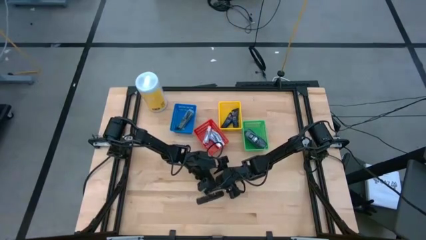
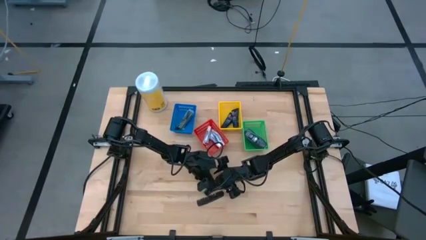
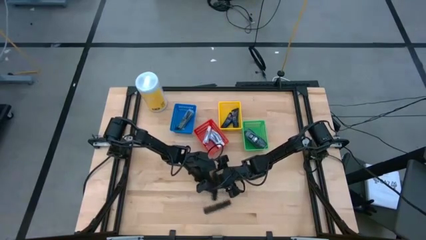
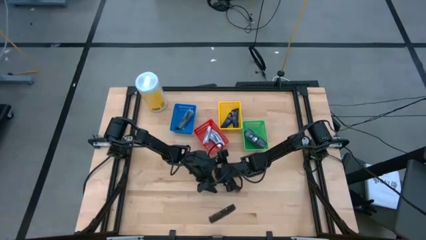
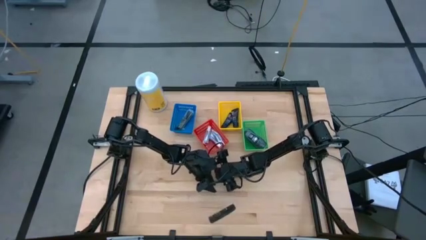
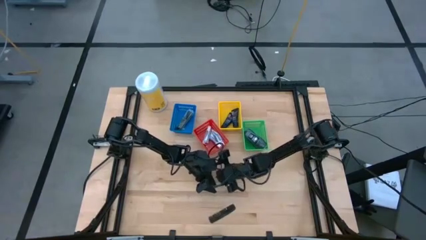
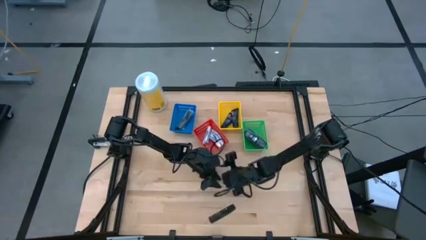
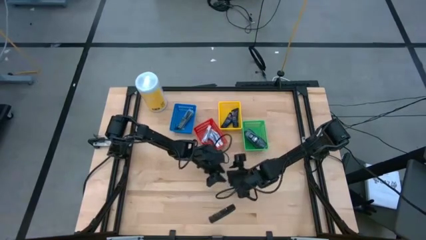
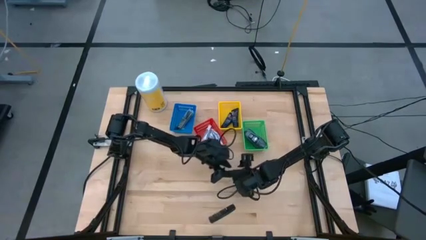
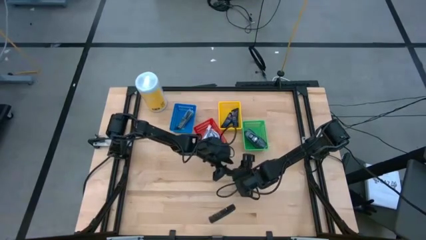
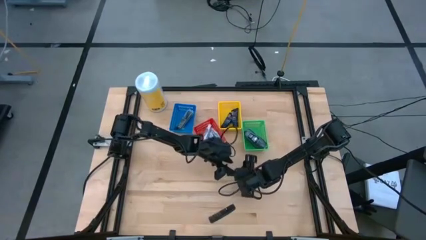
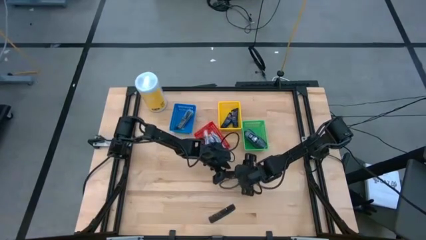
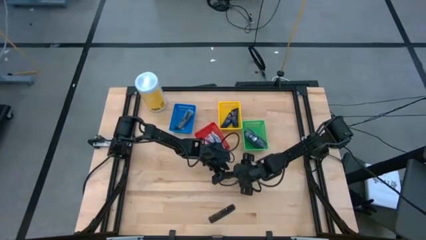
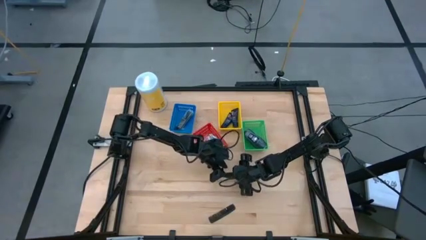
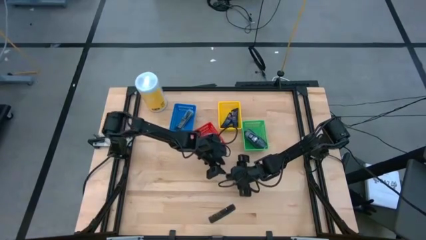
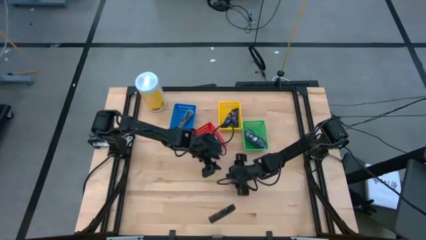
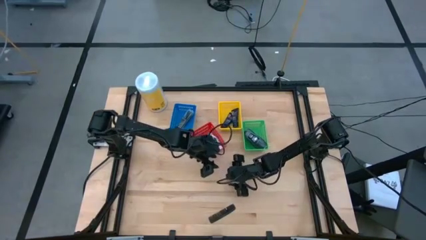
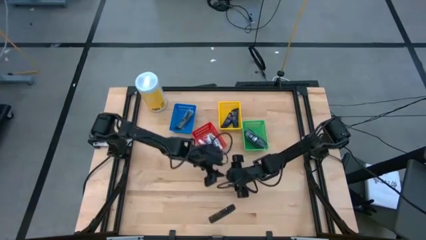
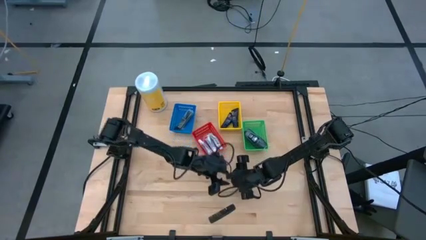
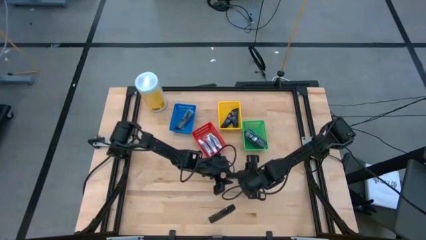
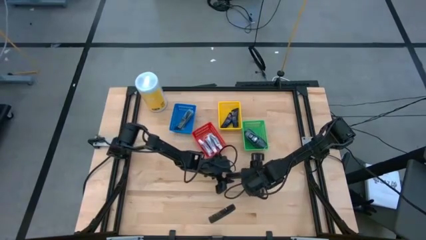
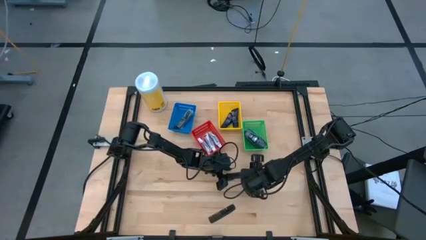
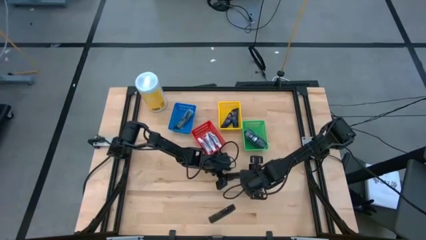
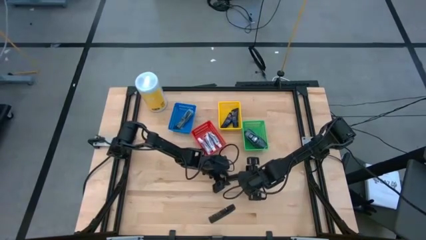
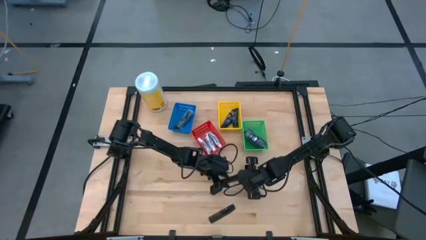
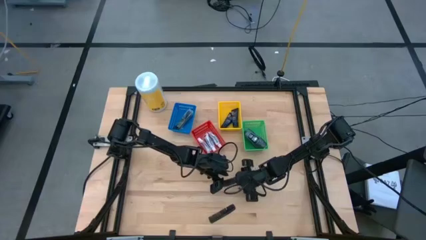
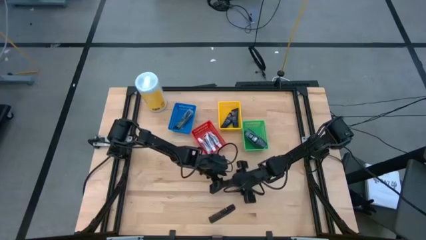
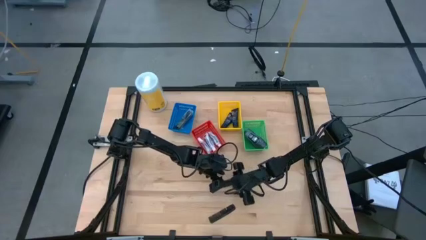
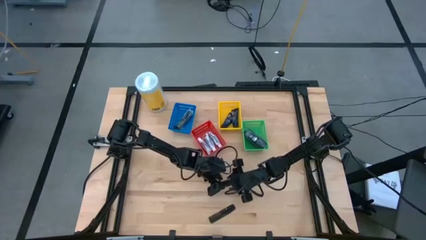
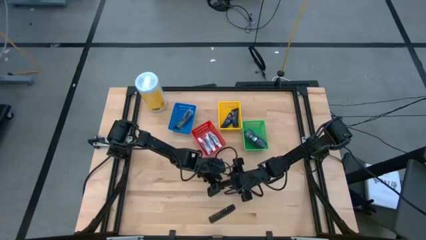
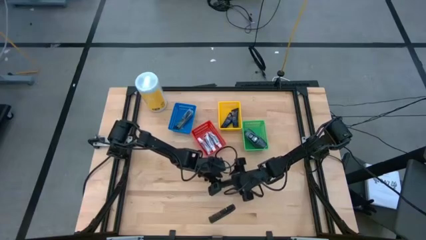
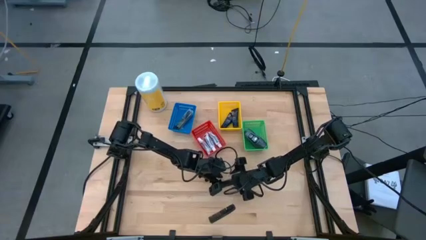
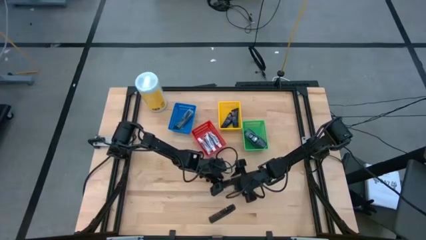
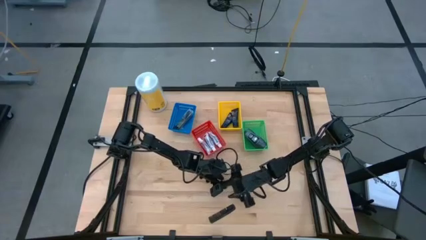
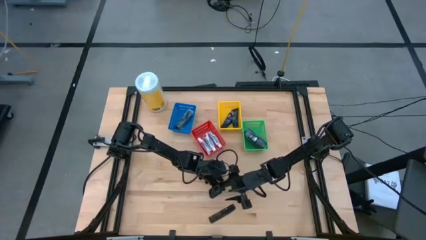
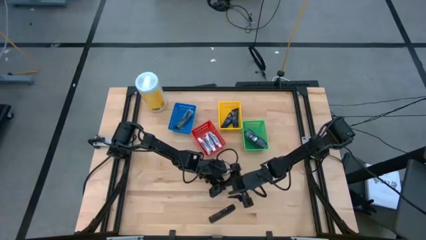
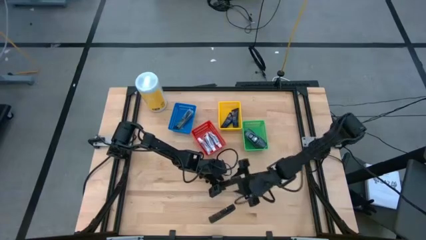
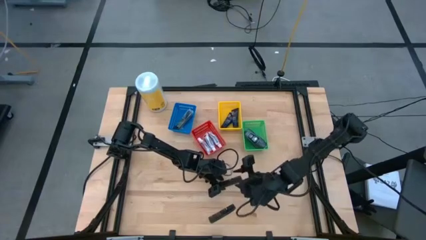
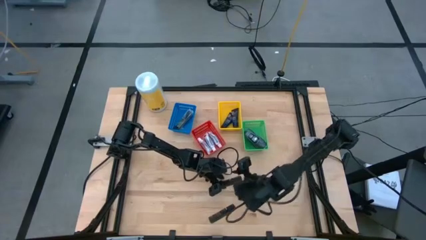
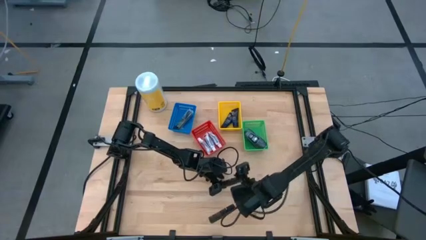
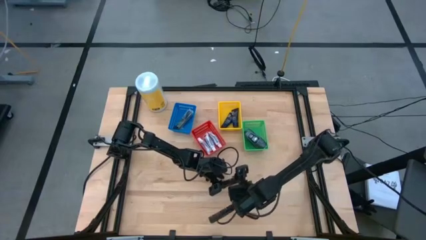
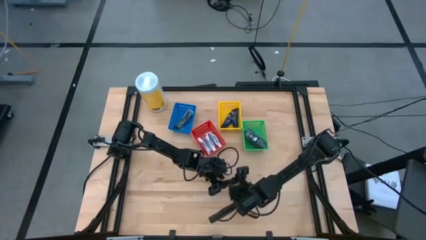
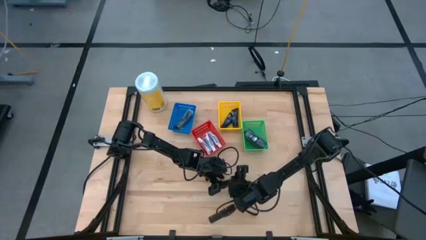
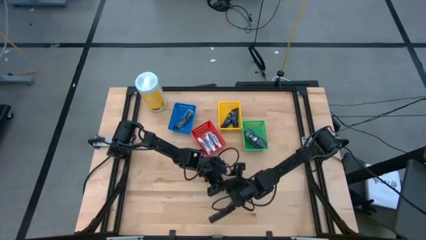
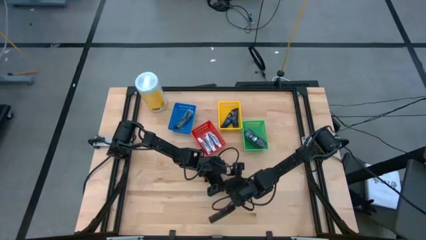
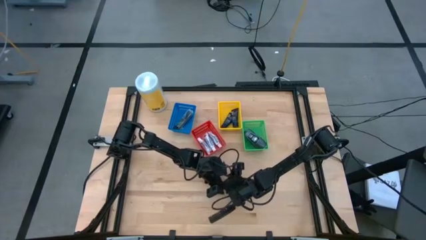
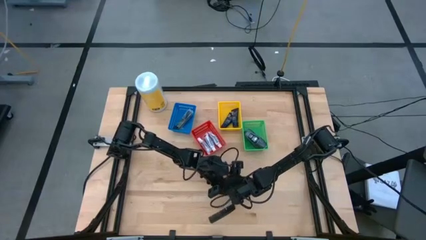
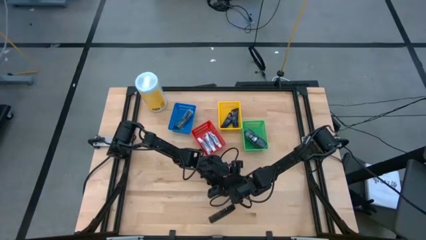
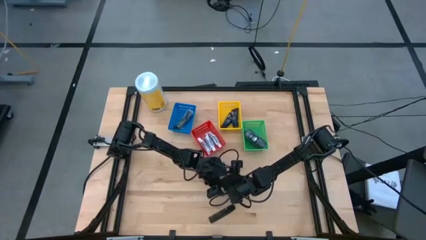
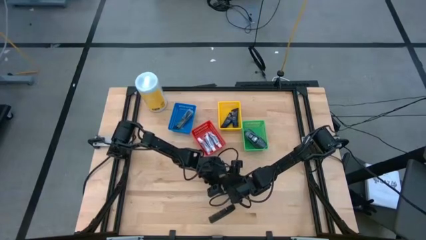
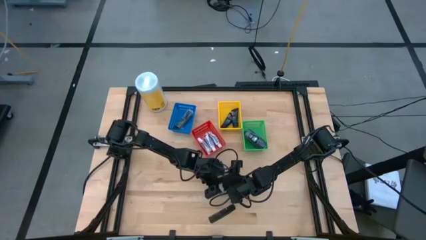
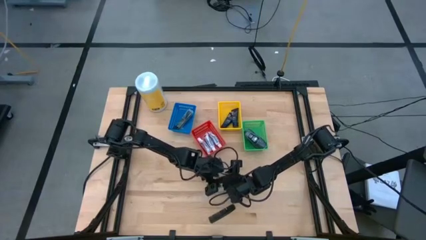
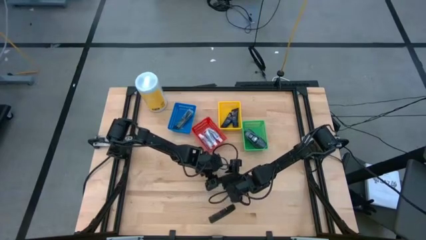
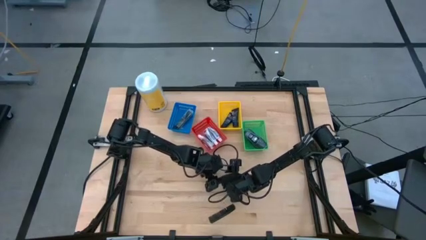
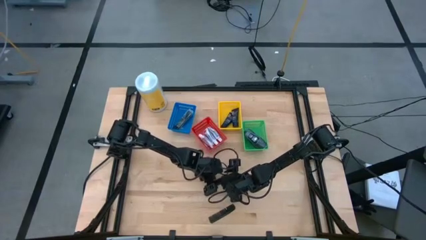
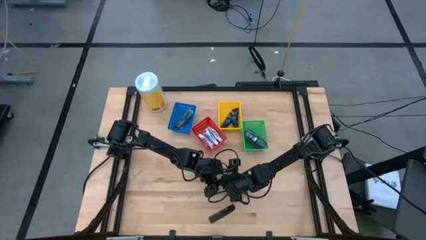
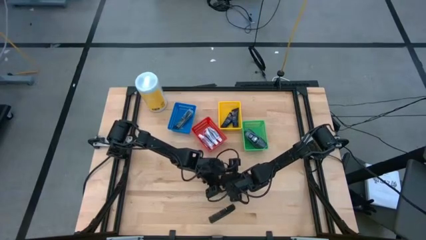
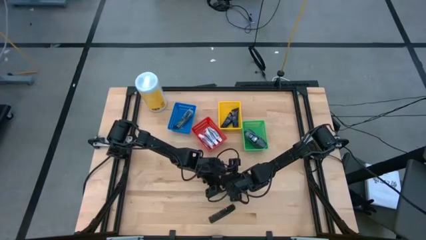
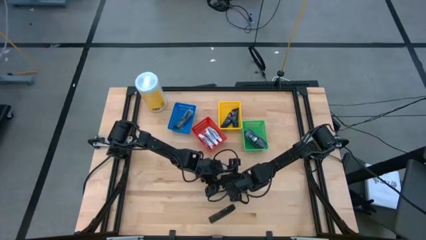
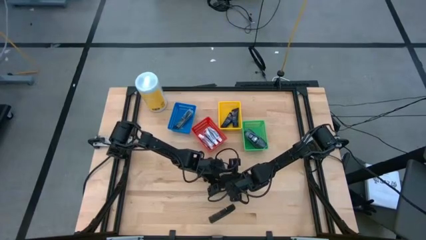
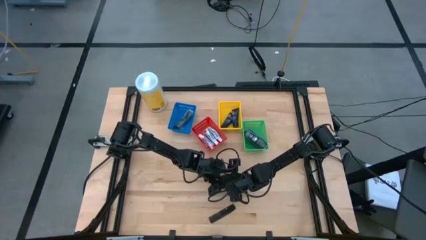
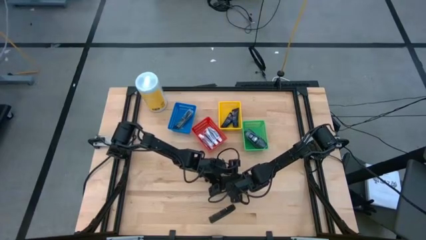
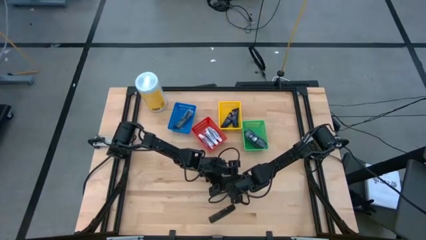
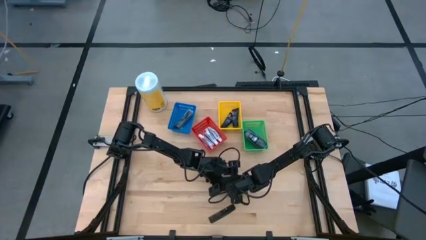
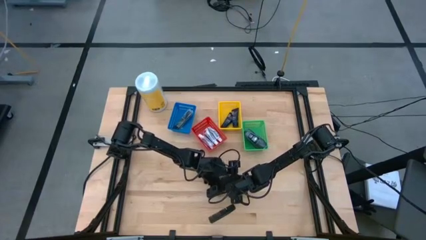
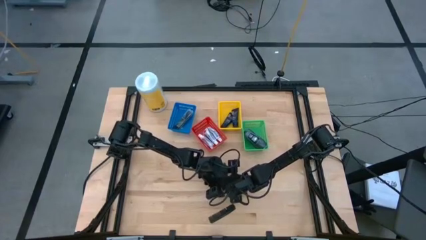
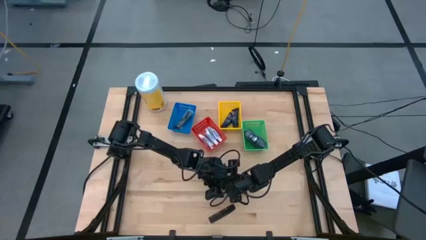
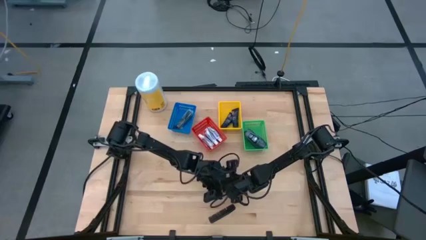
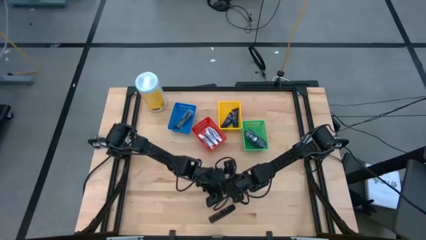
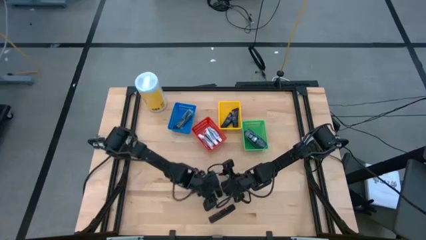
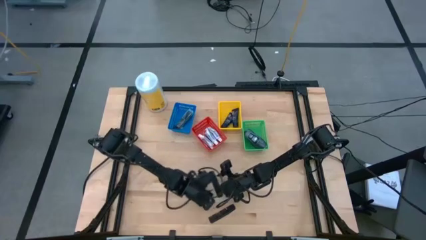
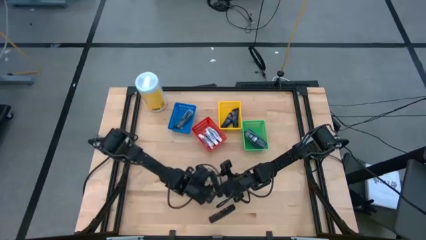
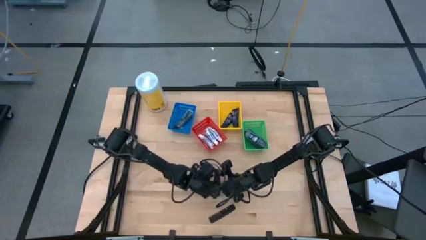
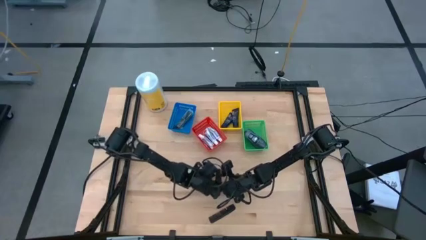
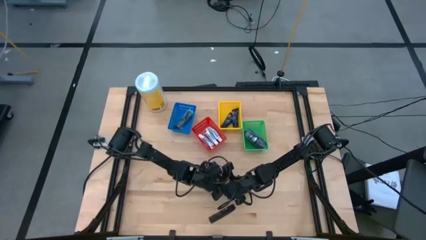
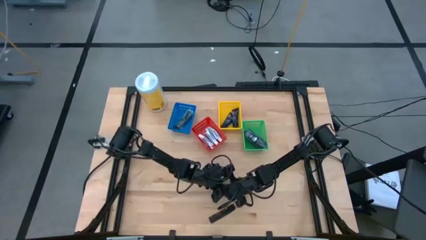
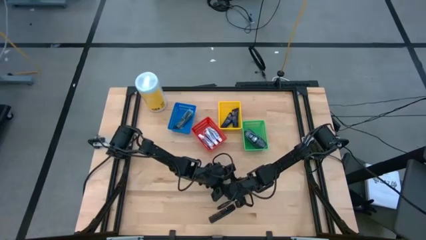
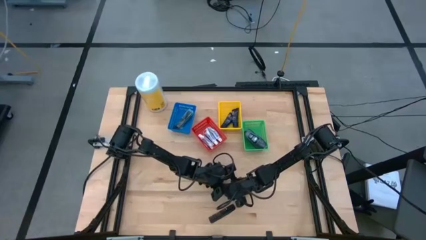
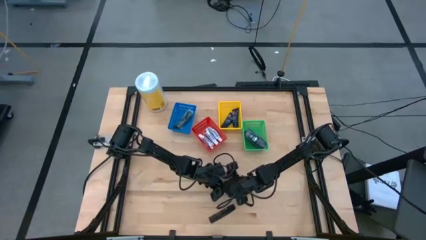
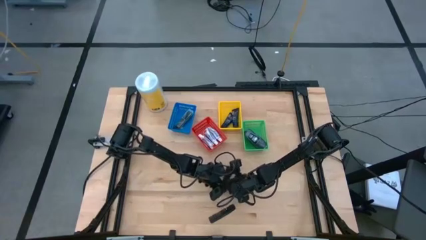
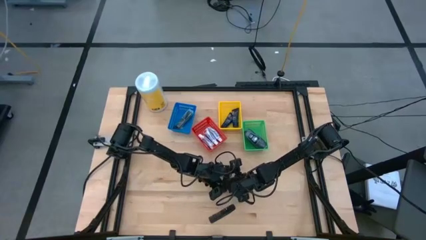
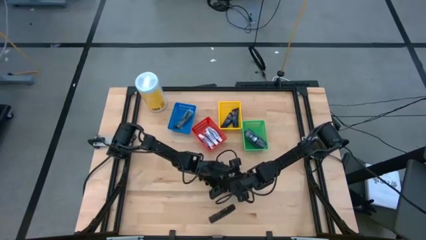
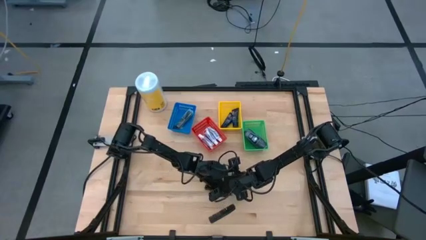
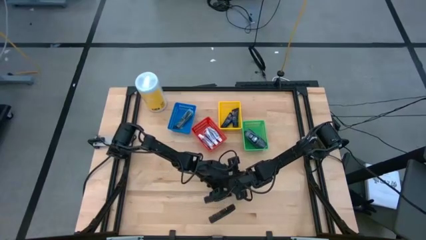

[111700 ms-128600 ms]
Task: Pick & Place Travel size toiletries
Put the black comb into the blue bin
